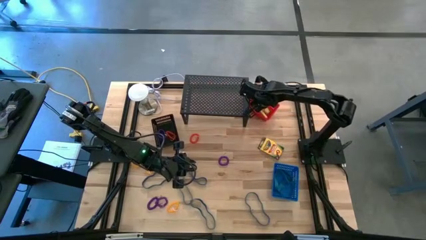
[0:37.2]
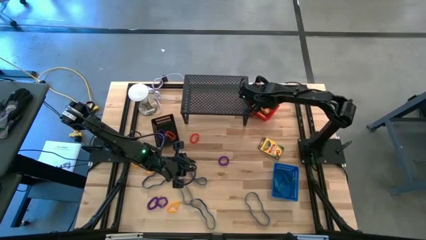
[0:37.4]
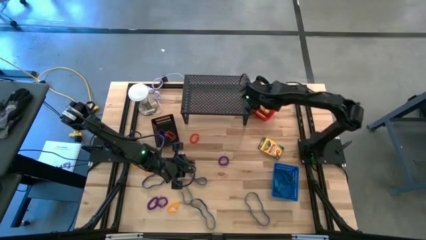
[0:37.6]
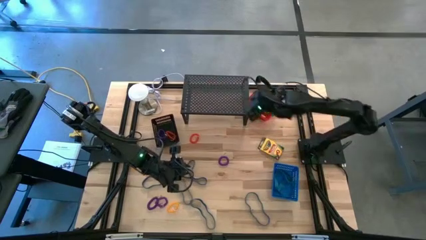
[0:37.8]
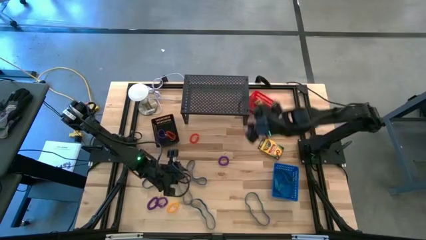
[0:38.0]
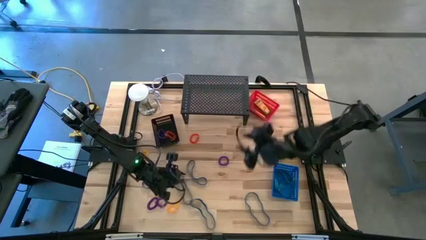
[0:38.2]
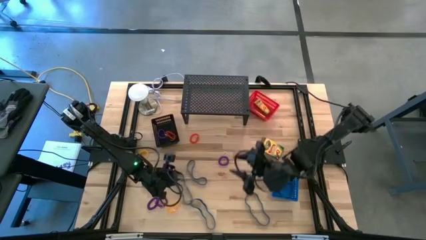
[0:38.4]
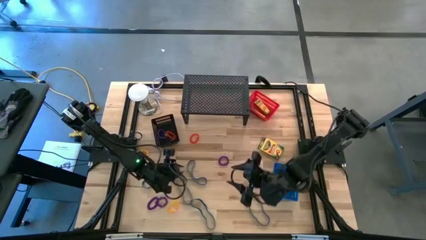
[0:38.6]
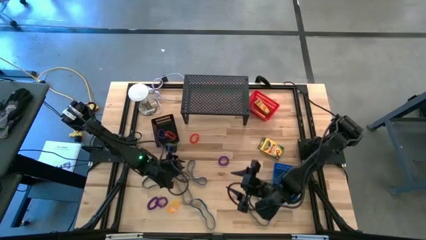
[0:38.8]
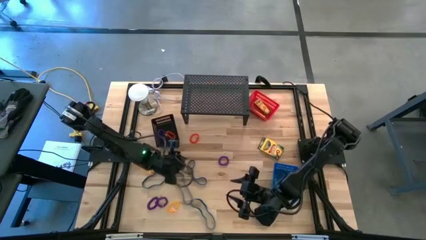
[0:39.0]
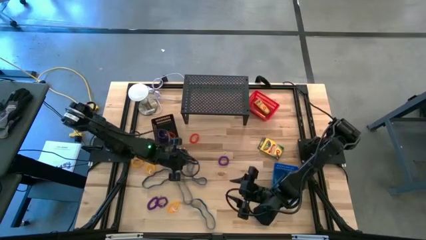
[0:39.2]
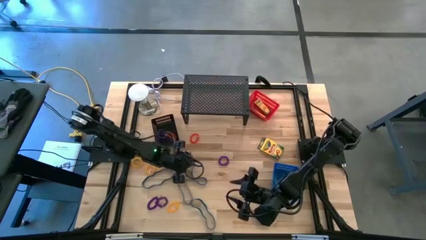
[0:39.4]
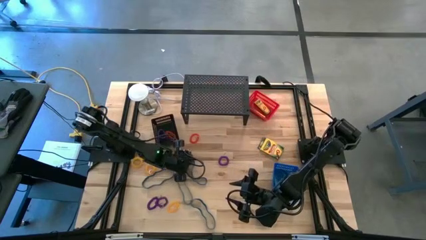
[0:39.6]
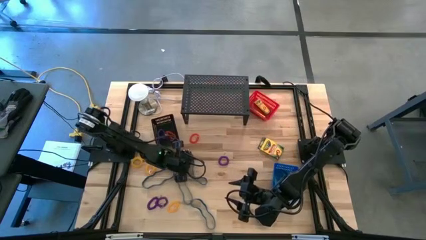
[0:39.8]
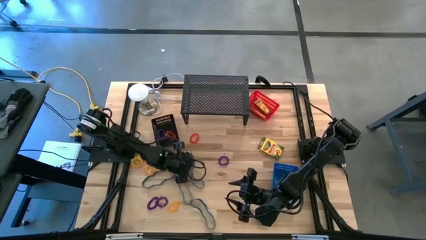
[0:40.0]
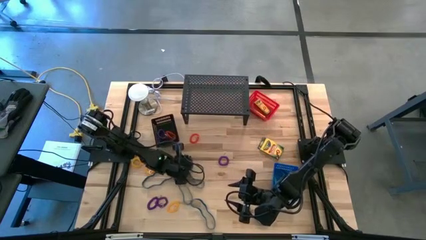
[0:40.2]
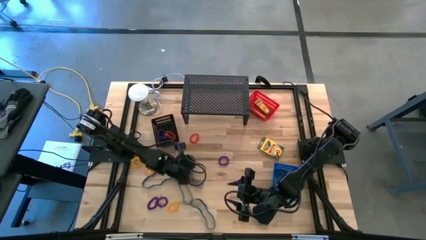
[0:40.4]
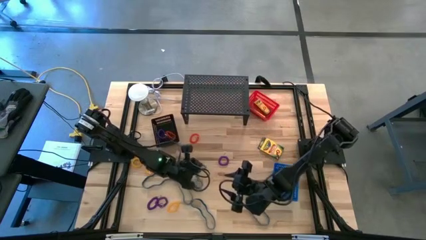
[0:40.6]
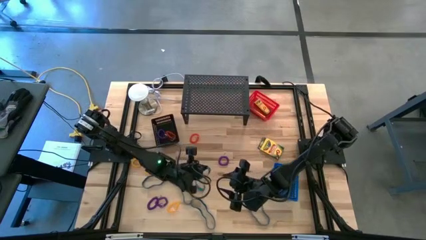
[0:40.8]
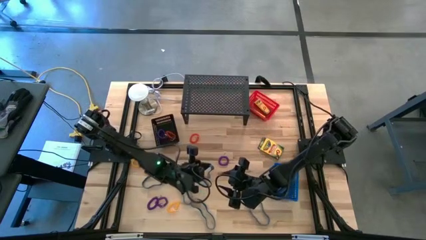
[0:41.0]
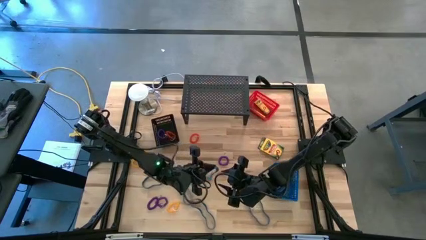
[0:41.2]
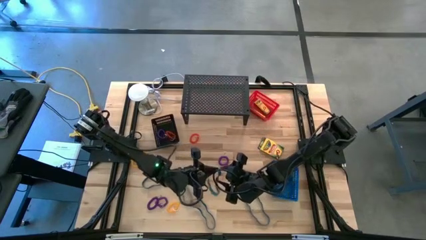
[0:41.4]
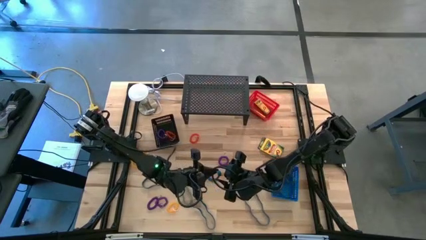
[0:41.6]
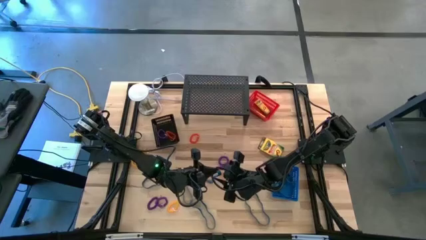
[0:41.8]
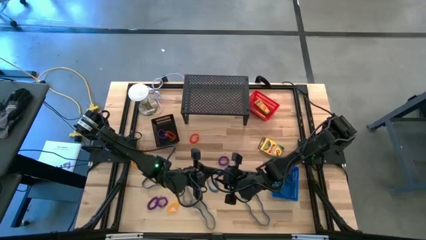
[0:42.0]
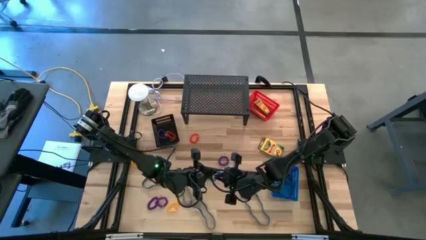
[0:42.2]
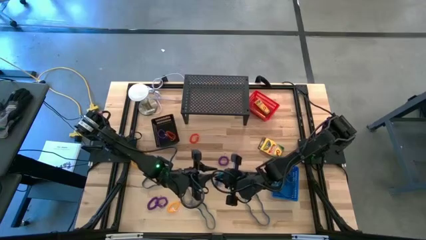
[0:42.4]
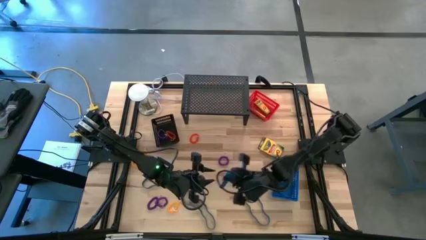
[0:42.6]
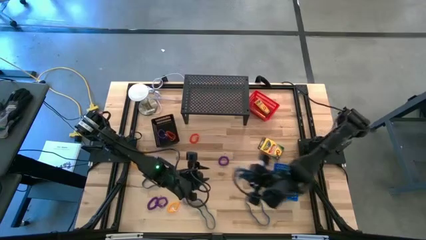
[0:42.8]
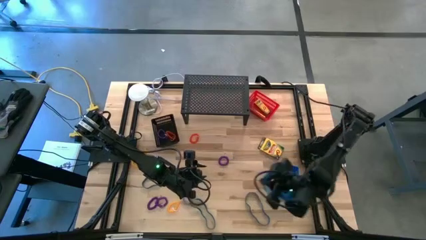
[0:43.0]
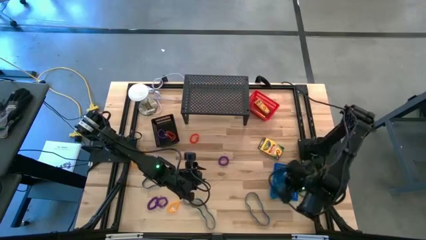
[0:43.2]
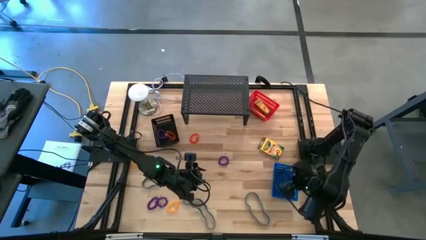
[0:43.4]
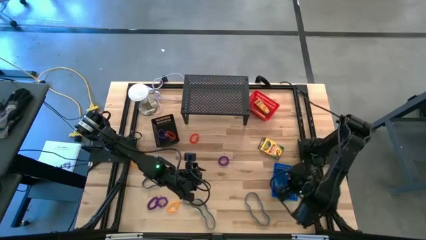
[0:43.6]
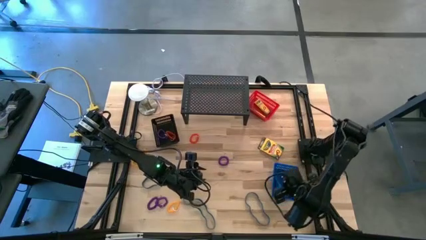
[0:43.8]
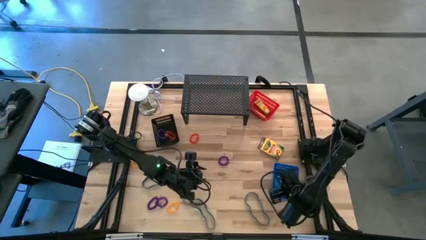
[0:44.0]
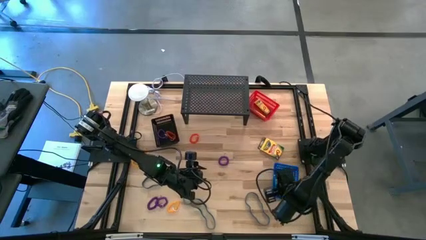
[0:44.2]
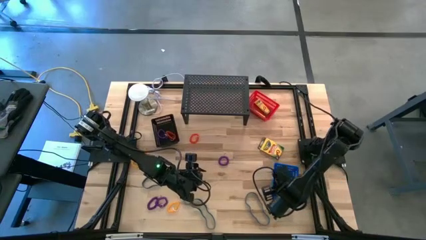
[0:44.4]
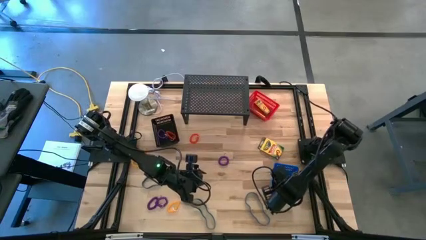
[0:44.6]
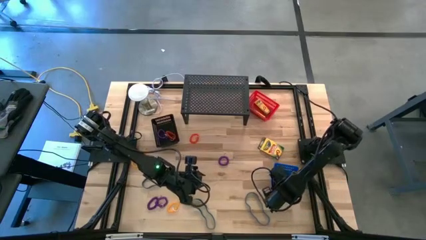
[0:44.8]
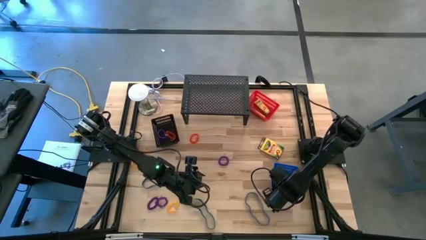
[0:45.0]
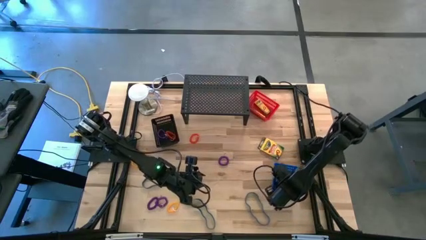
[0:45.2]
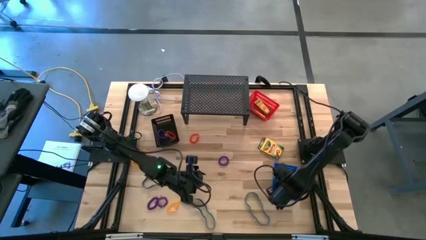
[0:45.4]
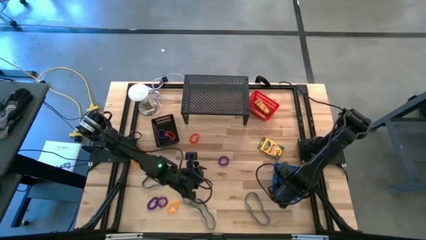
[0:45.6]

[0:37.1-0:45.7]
Task: Pick & Place Office Desk Supplies
Put the blue rubber band into the blue basket

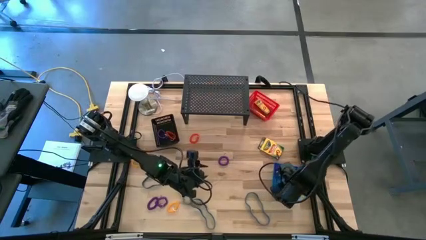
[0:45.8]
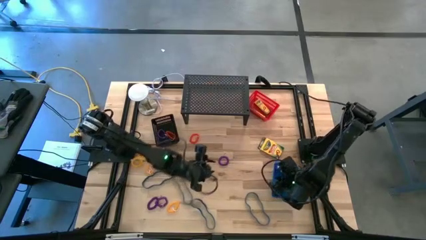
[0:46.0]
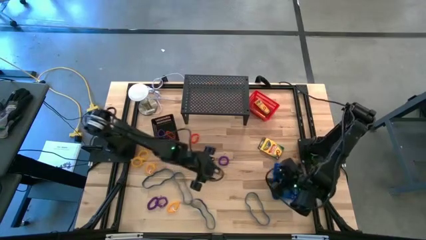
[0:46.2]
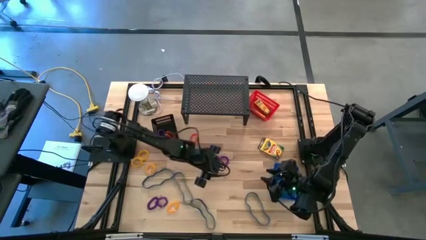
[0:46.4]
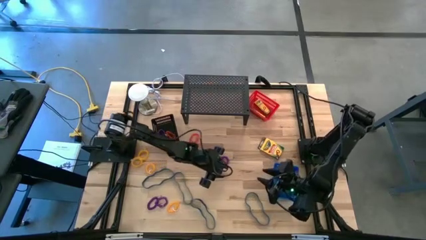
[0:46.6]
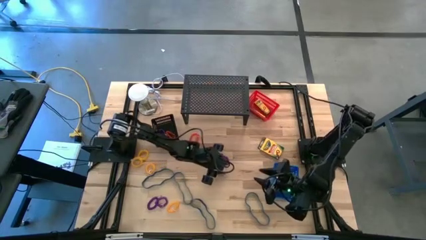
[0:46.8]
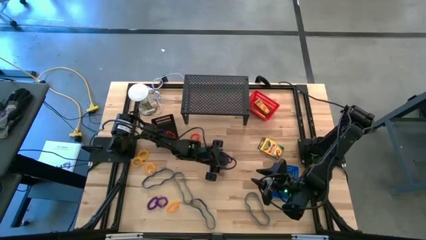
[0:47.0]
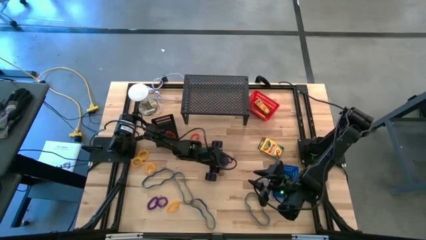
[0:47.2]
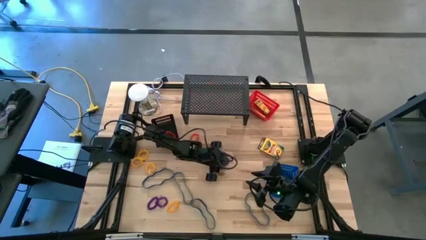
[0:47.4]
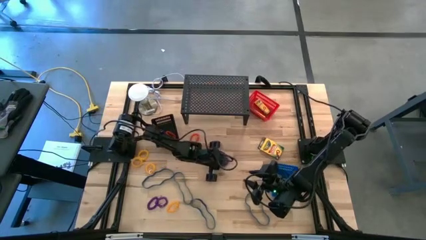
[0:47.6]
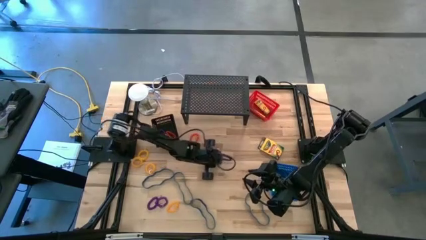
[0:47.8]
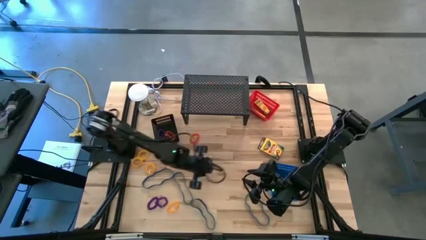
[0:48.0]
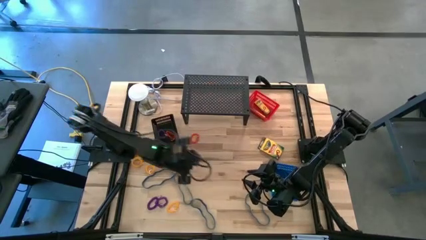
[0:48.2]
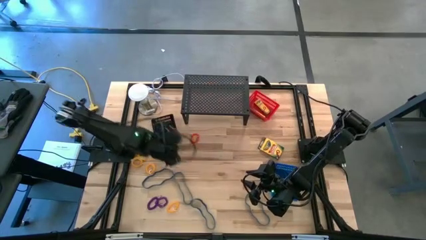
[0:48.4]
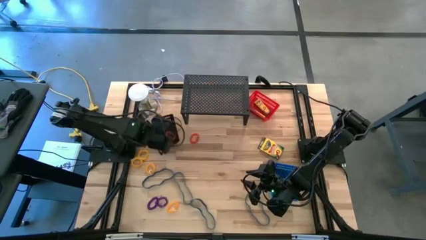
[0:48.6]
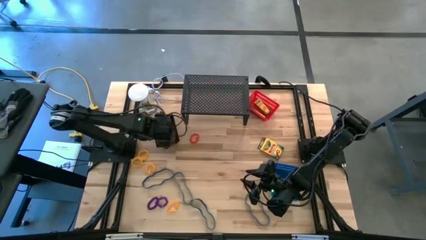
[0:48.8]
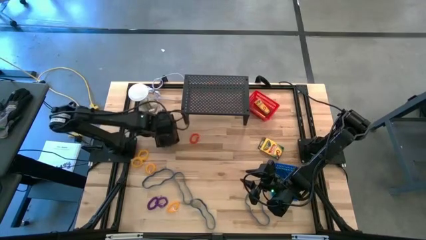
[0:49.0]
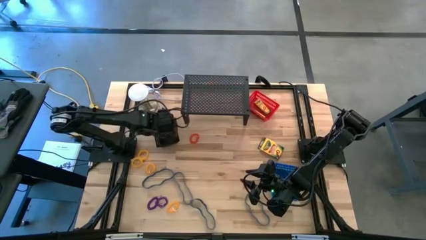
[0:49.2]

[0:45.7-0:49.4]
Put the purple spring keychain into the black basket

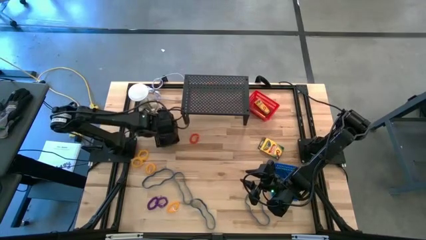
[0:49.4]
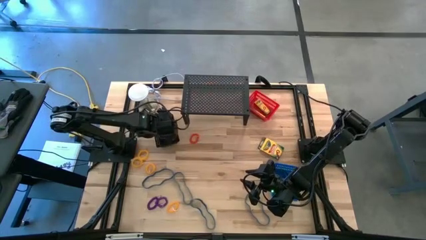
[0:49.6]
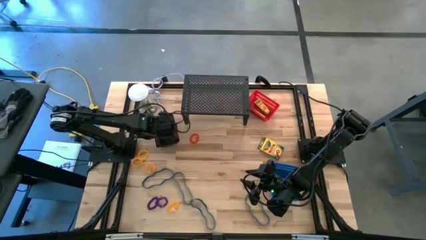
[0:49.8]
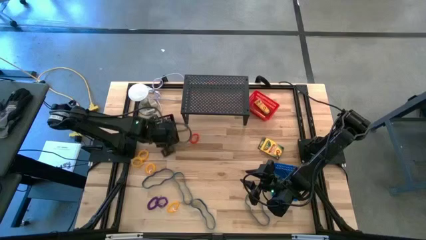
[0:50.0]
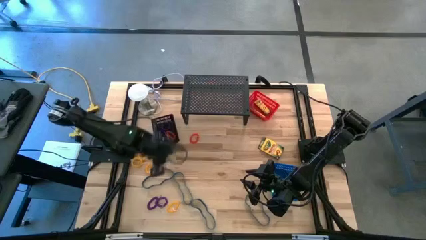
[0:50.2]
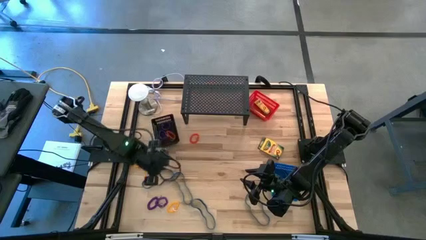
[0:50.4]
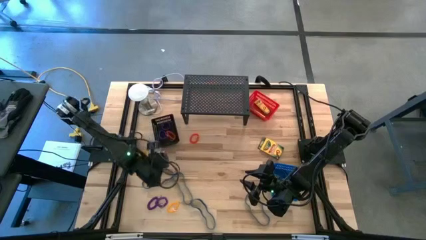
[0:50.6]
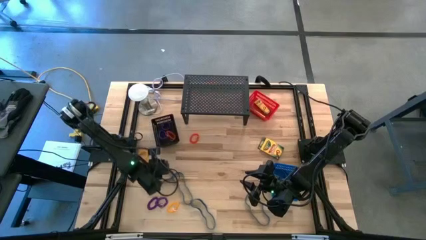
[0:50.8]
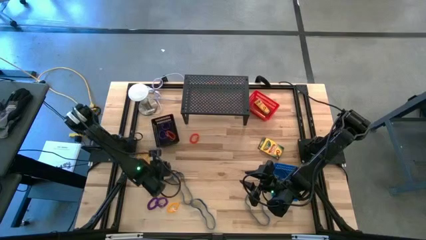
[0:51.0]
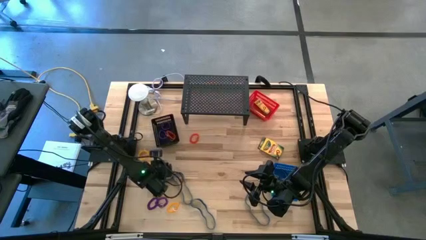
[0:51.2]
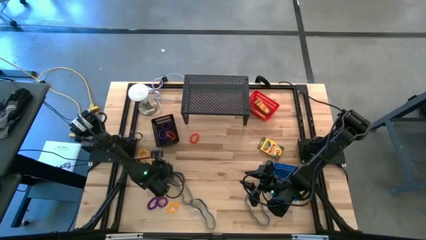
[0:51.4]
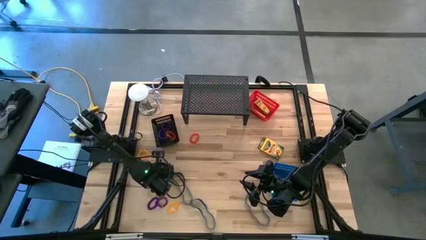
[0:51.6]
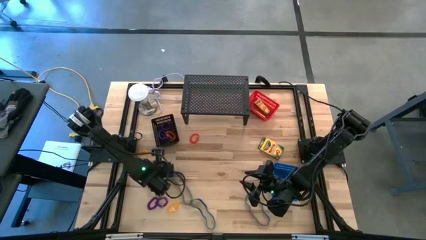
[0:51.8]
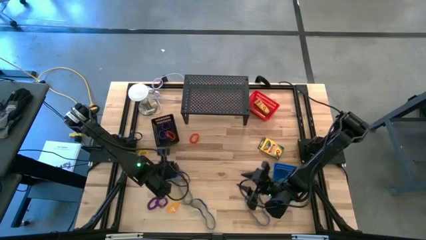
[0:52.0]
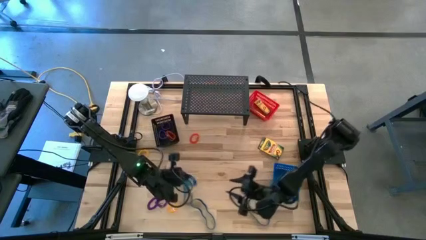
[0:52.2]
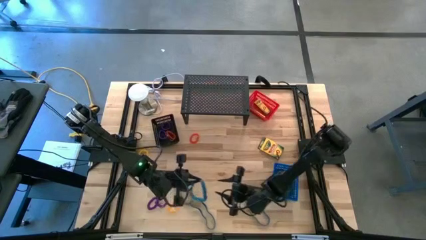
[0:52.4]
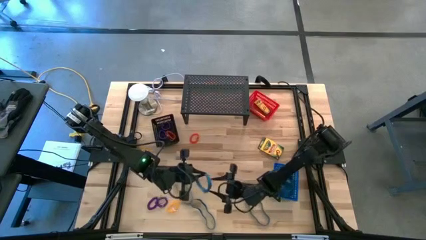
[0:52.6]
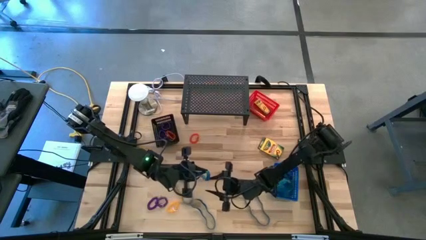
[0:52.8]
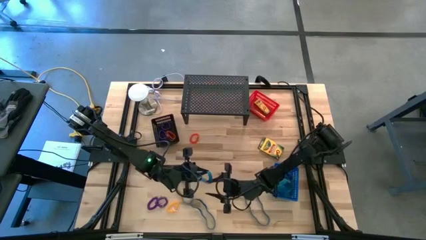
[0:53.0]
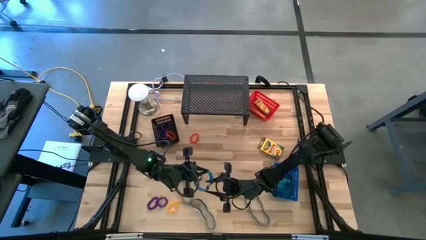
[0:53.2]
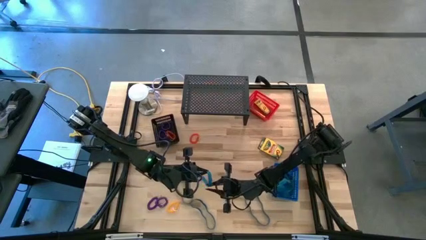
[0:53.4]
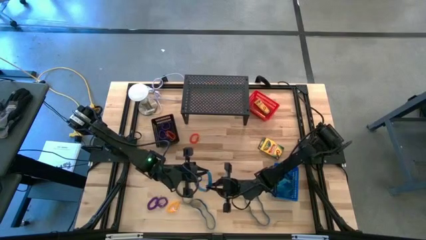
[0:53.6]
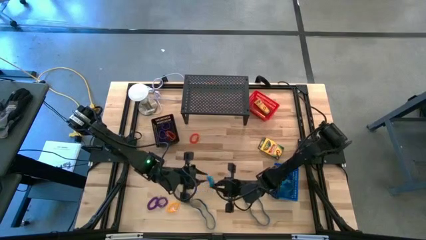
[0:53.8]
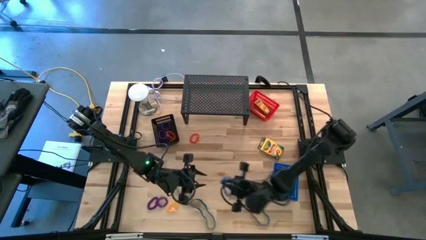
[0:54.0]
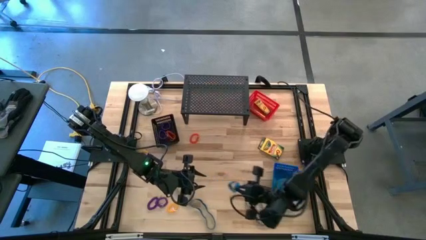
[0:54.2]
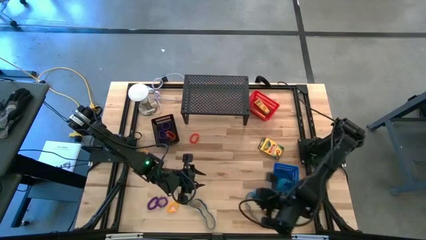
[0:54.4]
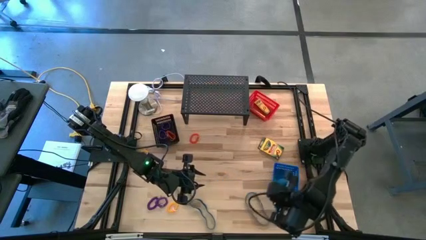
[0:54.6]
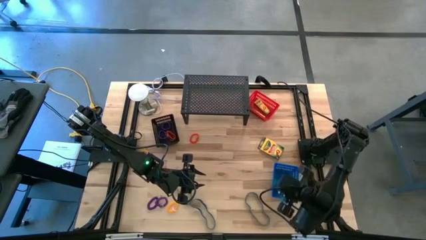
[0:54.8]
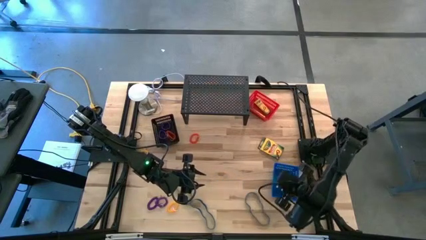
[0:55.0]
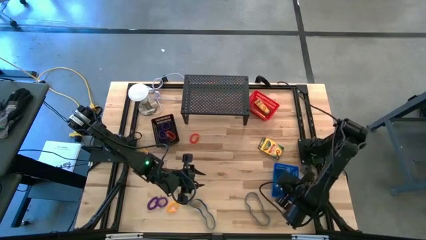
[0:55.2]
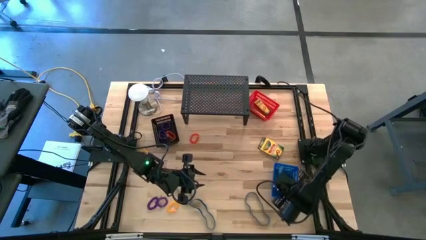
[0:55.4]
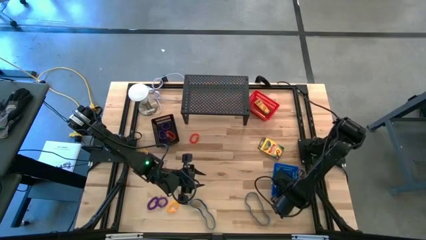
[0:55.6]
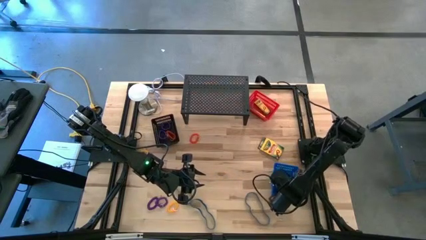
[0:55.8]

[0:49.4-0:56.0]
Put the blue rubber band into the blue basket
